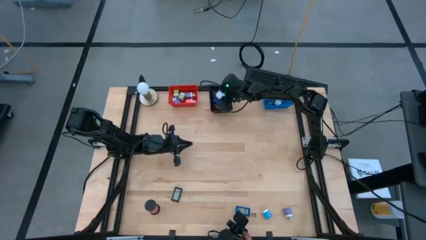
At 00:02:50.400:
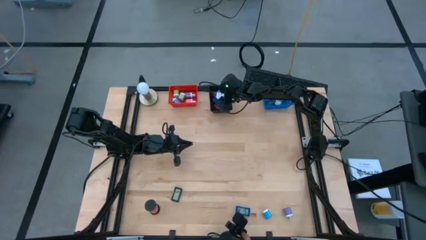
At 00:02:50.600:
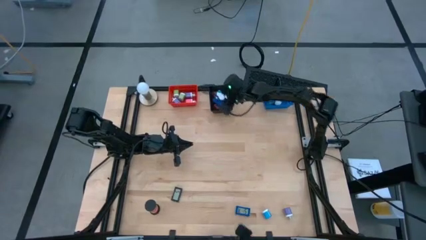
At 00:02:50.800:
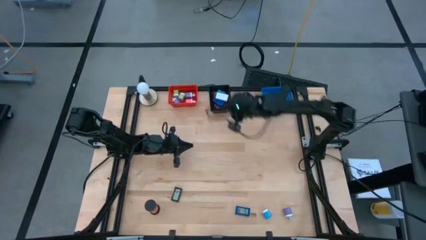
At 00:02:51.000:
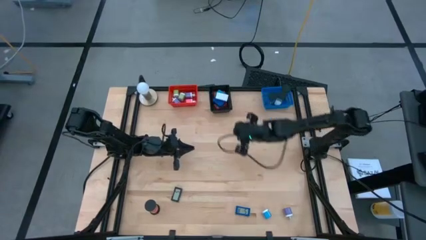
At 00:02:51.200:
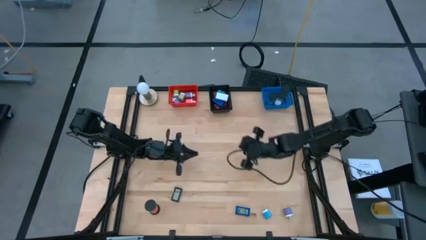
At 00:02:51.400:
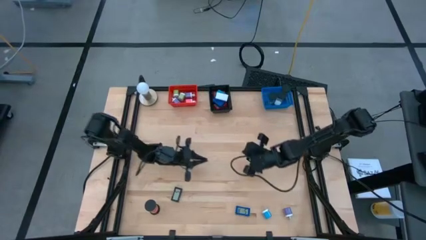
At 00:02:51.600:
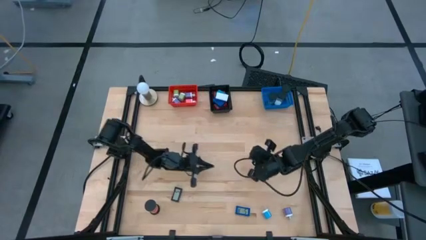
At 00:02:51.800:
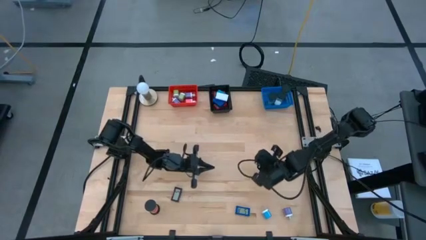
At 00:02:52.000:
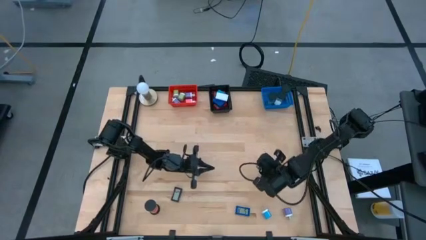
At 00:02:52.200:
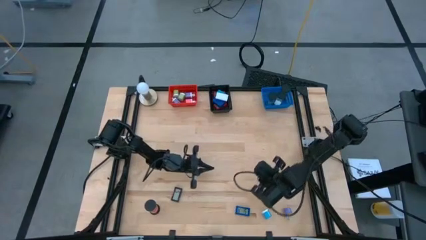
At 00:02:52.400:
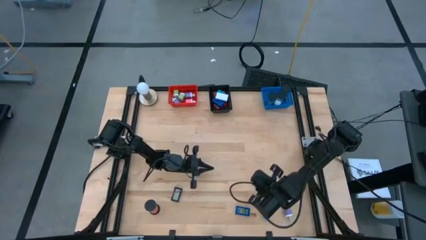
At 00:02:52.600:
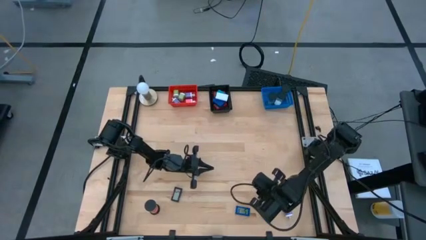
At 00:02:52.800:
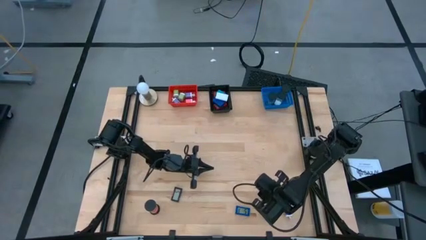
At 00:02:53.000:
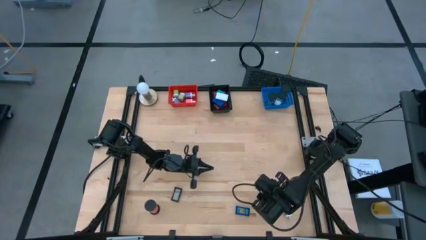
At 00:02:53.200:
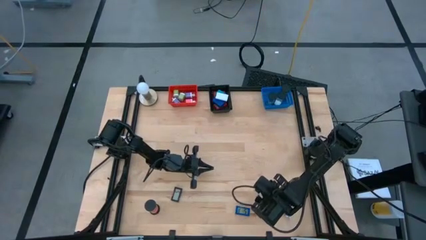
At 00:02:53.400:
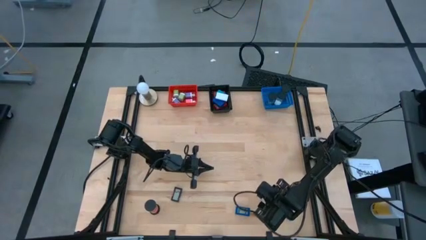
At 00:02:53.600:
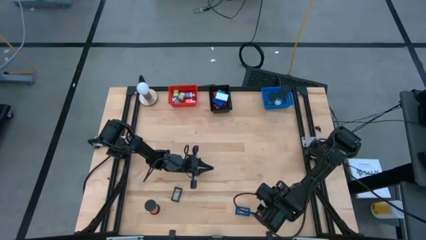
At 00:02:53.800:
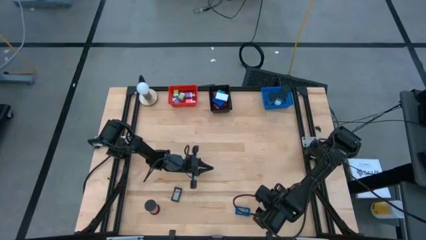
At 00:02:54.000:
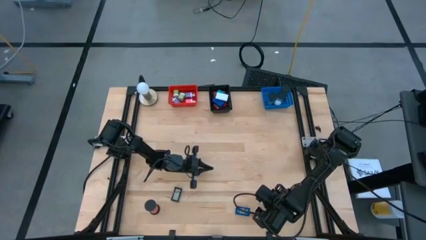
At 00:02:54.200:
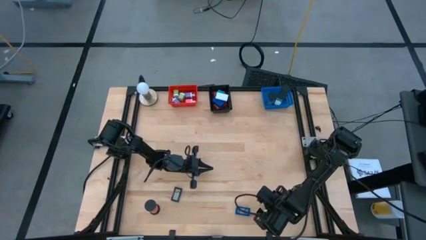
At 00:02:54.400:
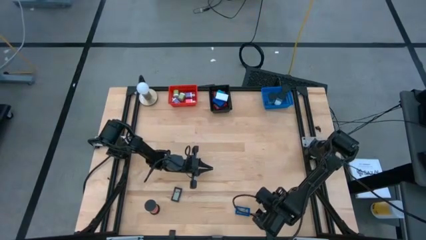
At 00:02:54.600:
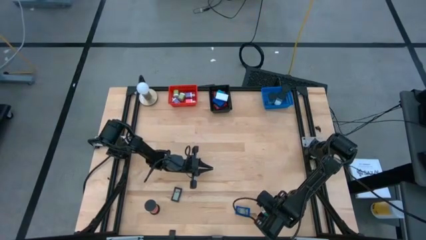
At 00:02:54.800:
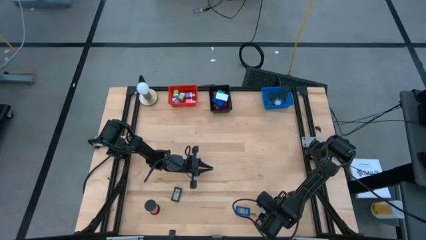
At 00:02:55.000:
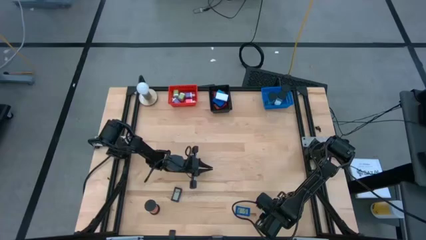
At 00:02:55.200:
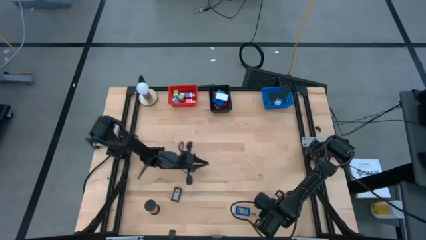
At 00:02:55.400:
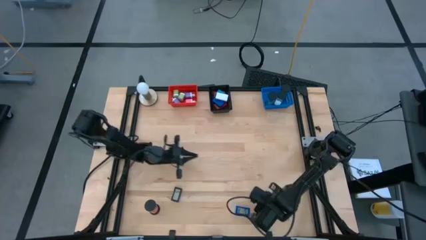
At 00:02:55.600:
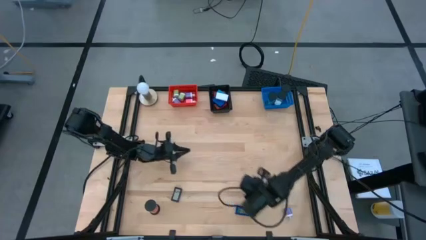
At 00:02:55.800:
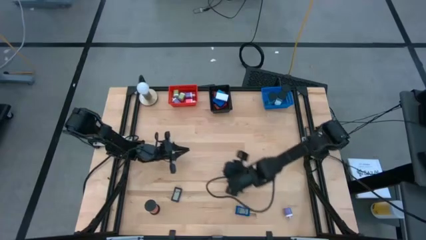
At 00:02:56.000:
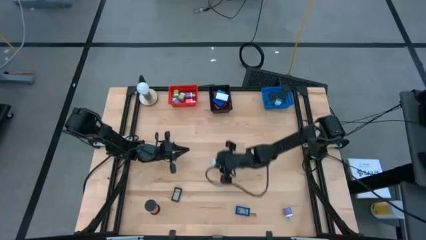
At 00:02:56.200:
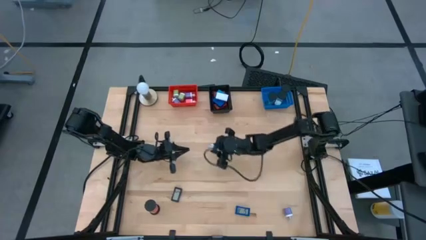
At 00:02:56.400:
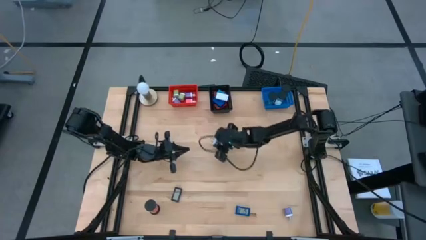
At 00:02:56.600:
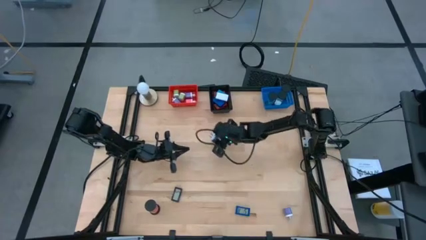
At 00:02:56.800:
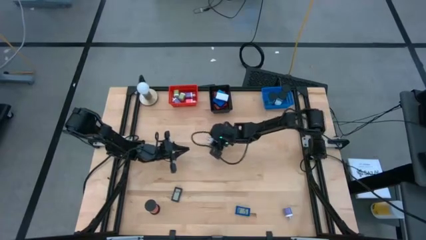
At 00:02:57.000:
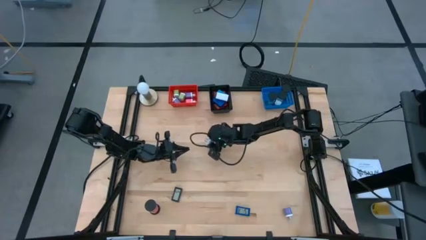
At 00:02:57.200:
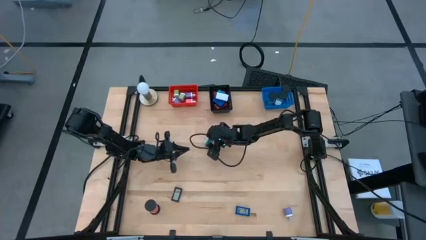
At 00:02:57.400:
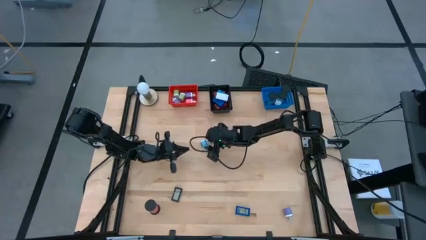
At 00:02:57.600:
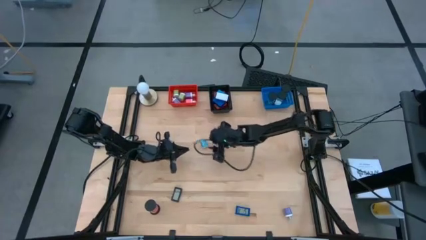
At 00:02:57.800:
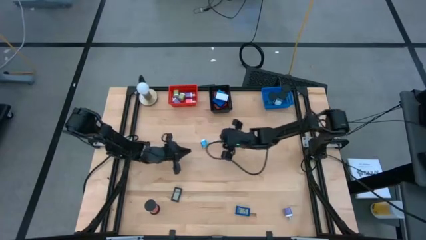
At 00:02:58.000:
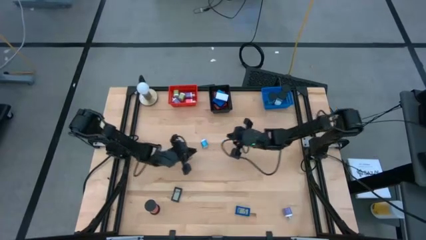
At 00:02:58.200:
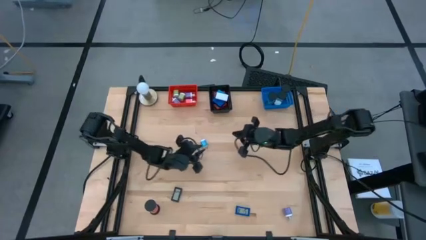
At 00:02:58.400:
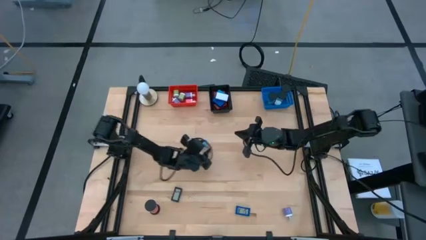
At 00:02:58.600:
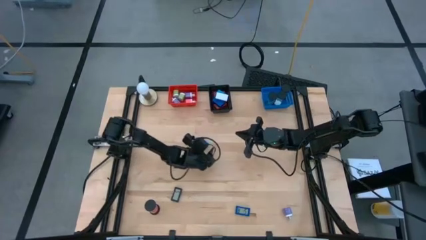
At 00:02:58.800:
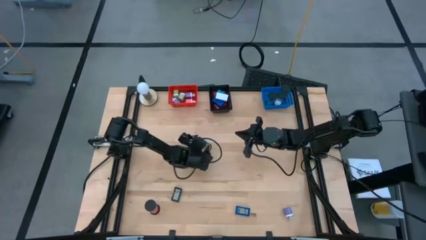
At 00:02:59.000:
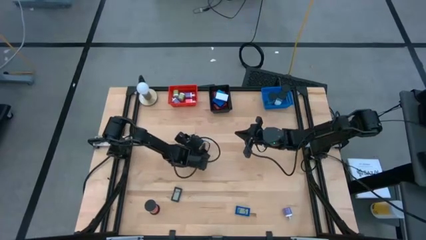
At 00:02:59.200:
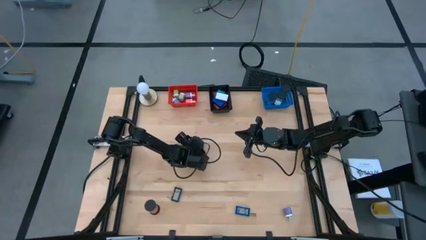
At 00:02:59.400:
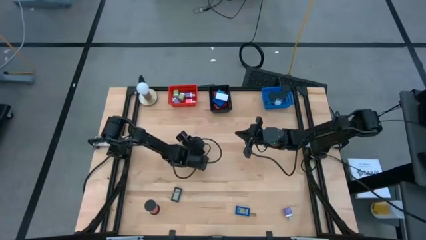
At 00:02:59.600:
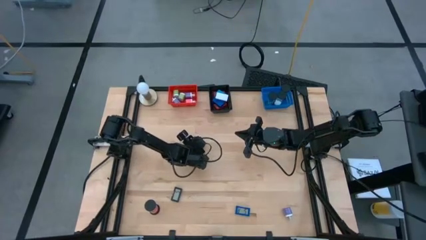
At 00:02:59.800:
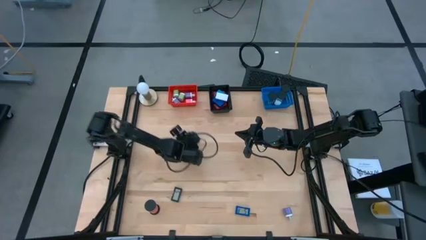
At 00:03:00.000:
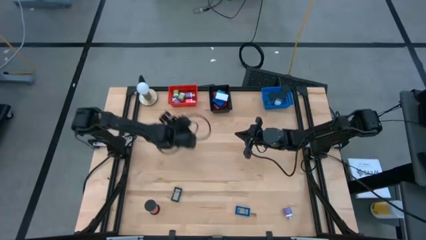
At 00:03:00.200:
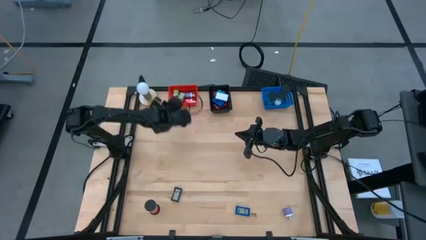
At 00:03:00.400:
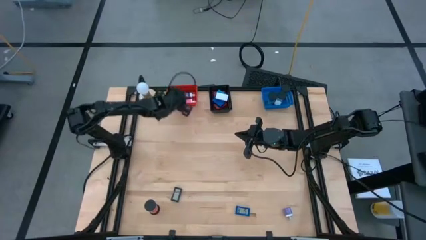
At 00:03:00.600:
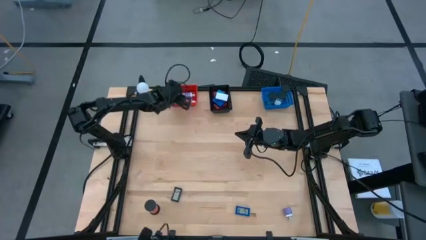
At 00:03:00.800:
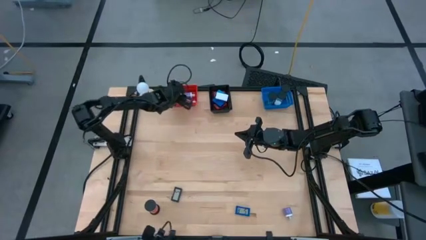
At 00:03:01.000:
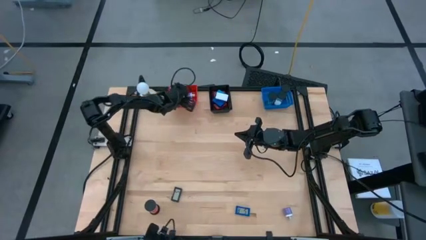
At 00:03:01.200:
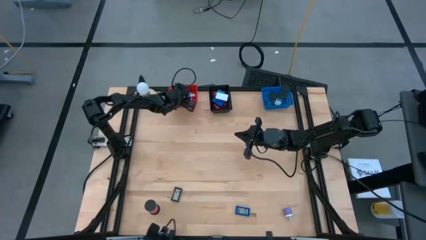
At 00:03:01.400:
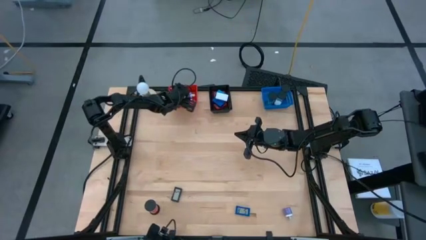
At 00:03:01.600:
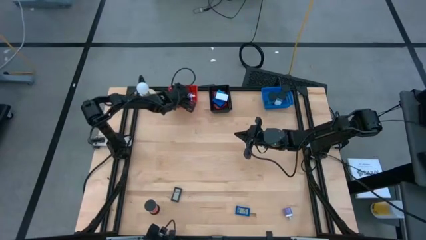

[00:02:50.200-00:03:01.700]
Task: Pick & Place Office items
Put the blue charger adapter into the red bin

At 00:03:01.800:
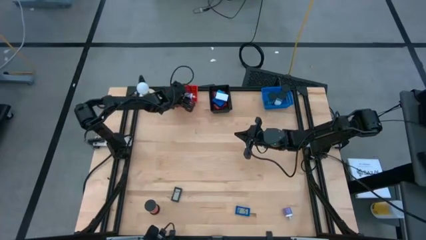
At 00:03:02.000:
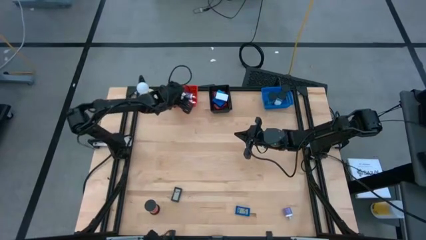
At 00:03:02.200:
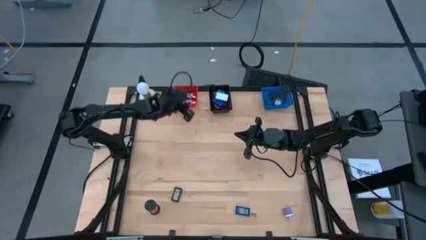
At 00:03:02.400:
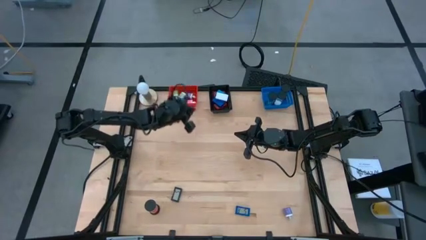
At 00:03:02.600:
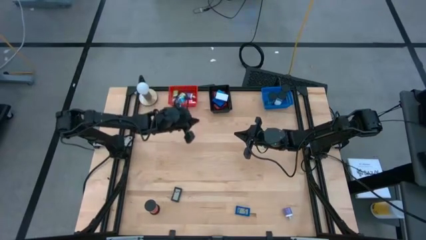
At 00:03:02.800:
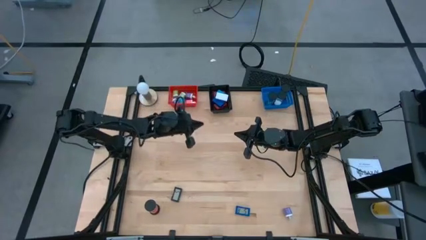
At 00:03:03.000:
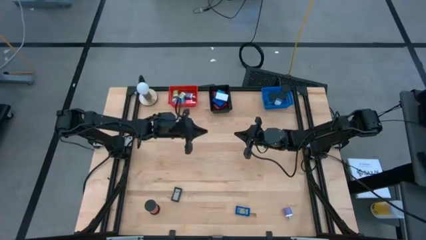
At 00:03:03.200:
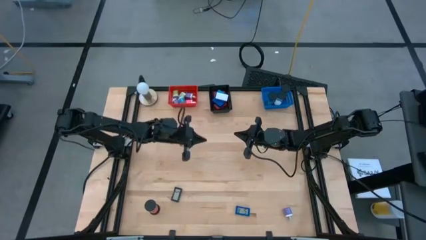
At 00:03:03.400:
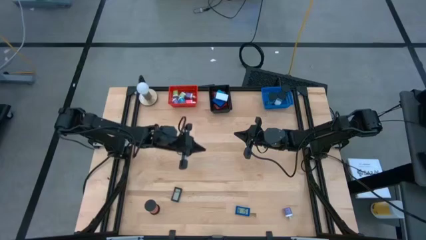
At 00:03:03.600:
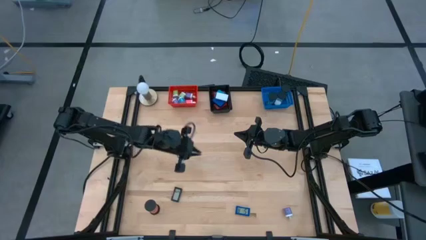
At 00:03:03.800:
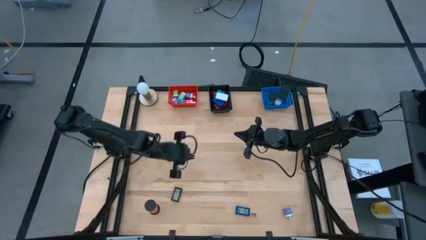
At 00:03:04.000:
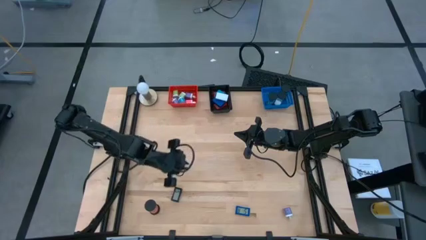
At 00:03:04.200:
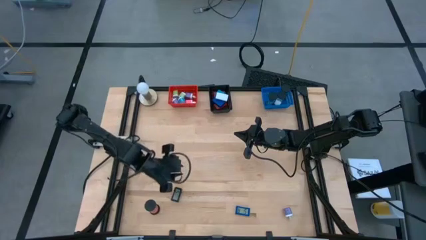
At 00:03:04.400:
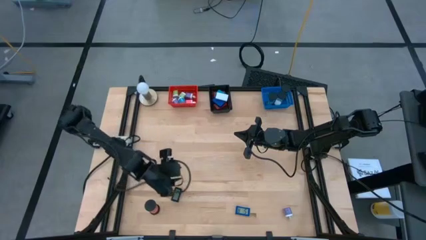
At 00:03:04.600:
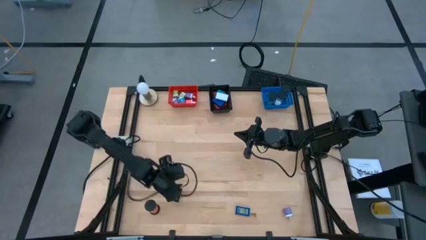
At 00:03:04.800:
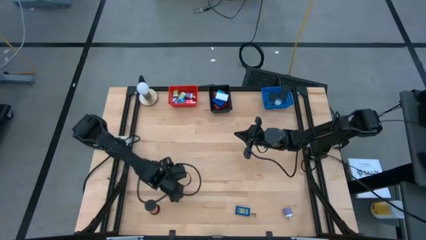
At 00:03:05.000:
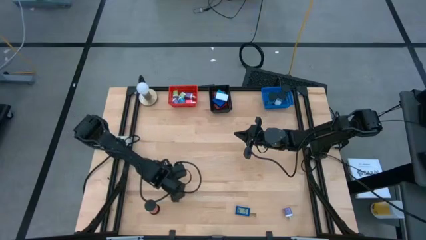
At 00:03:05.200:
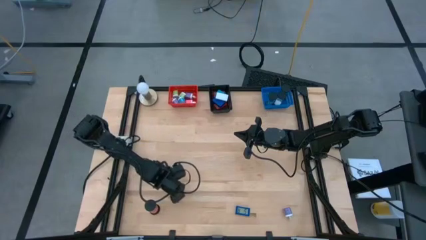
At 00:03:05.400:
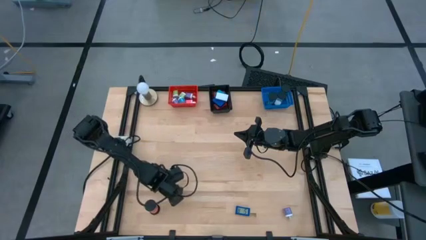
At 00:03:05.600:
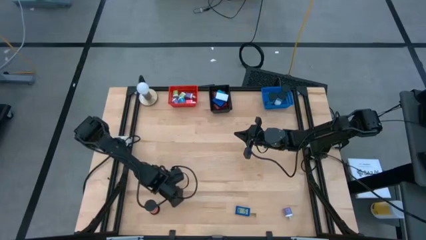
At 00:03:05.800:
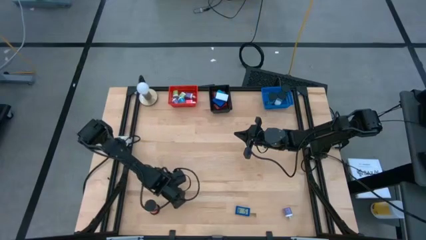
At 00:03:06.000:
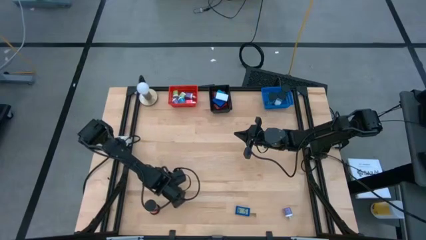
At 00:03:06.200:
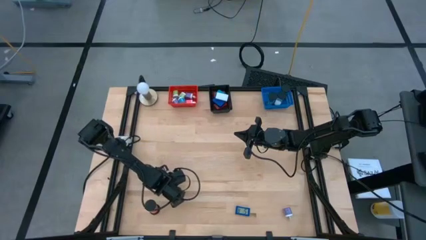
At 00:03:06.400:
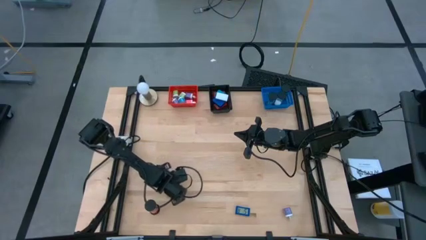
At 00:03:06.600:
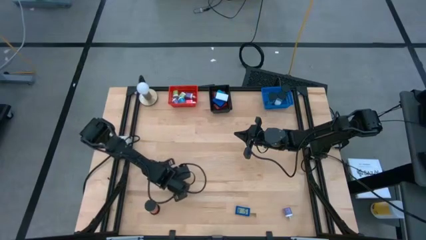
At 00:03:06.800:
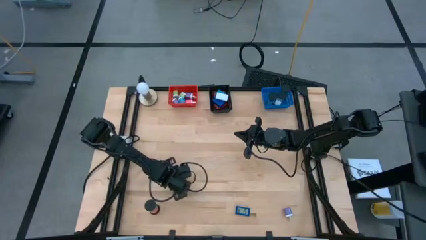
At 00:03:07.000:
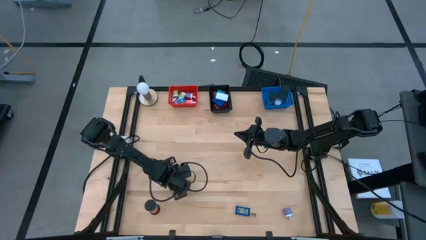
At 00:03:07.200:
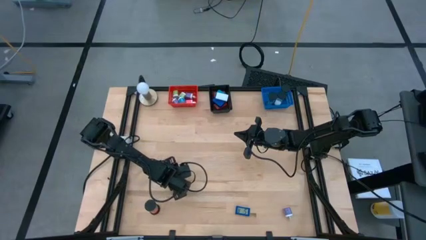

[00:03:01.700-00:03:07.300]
Put the black digital timer into the black bin
